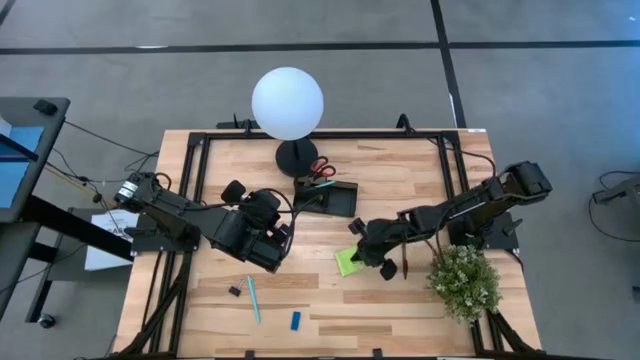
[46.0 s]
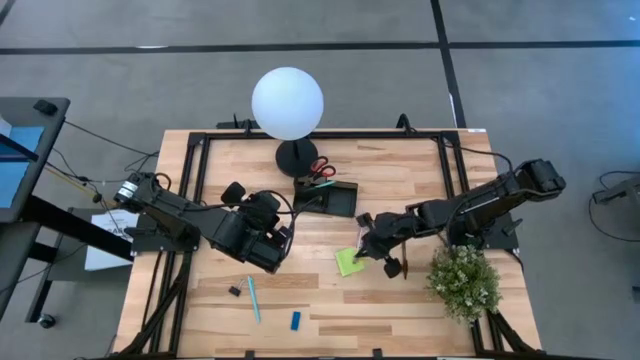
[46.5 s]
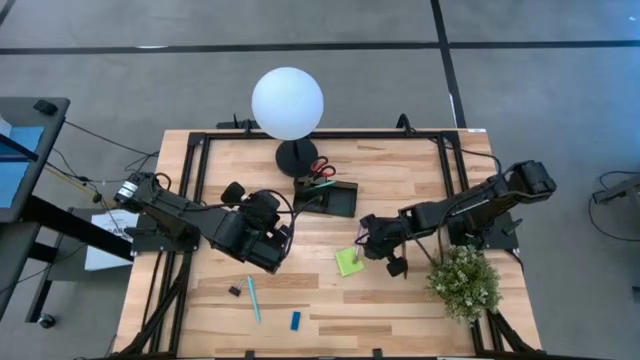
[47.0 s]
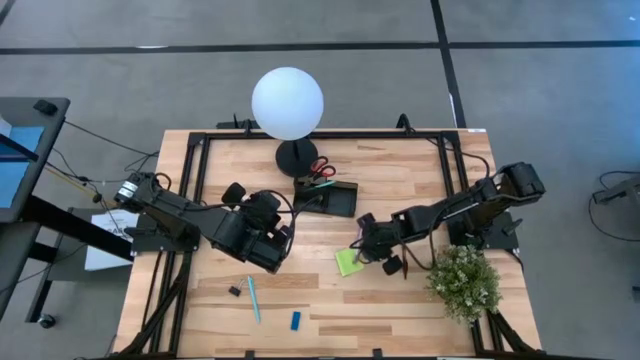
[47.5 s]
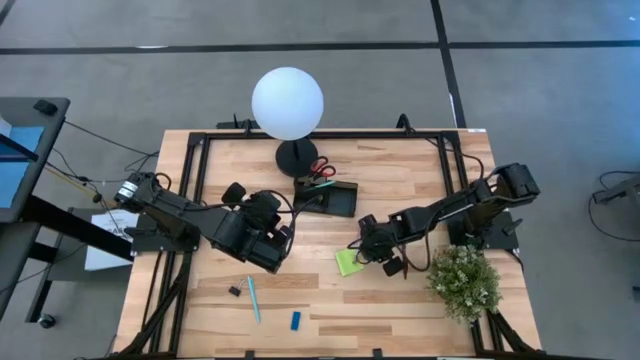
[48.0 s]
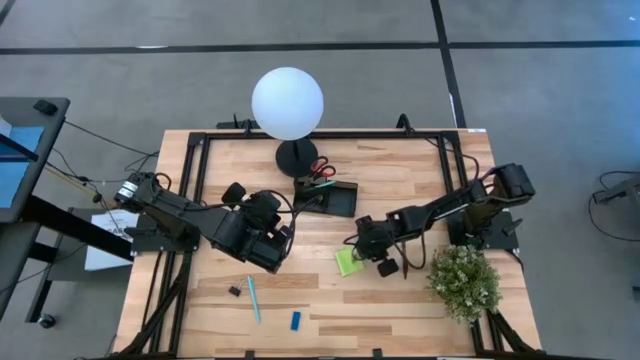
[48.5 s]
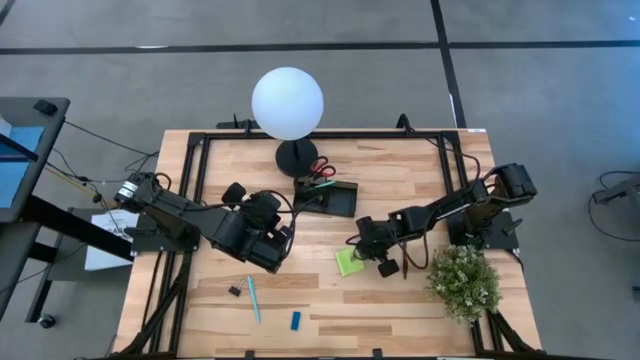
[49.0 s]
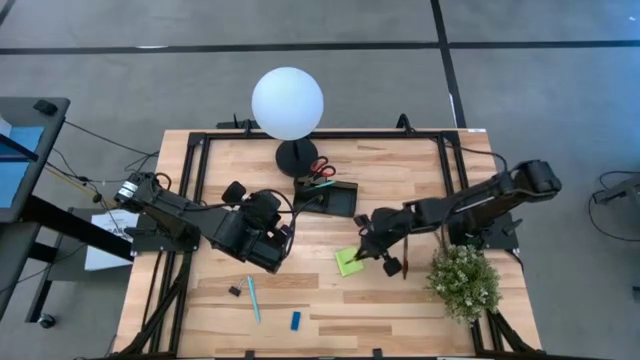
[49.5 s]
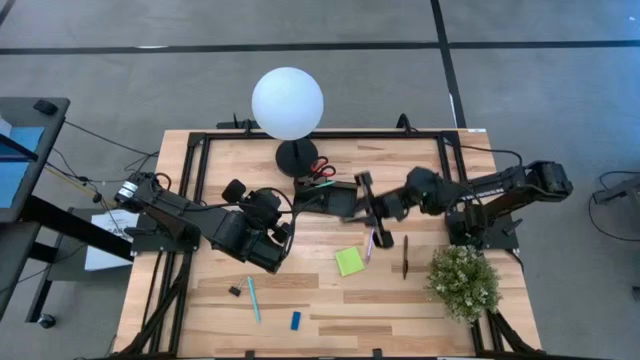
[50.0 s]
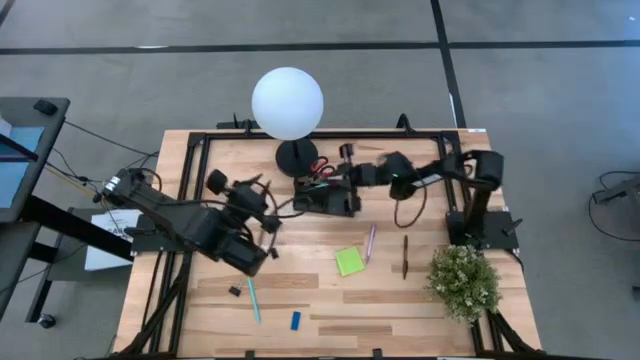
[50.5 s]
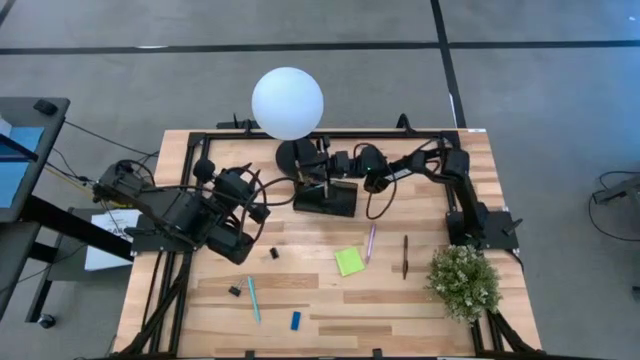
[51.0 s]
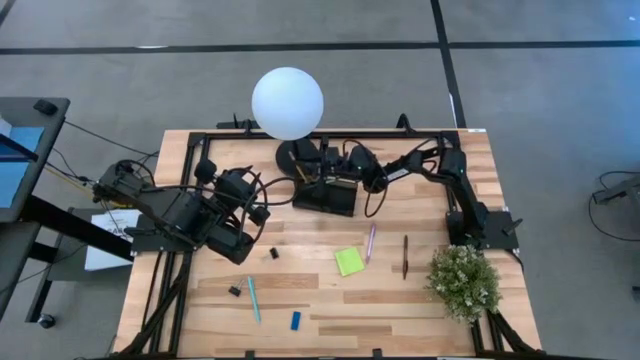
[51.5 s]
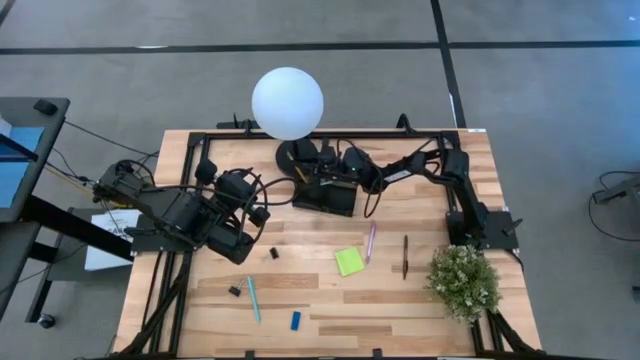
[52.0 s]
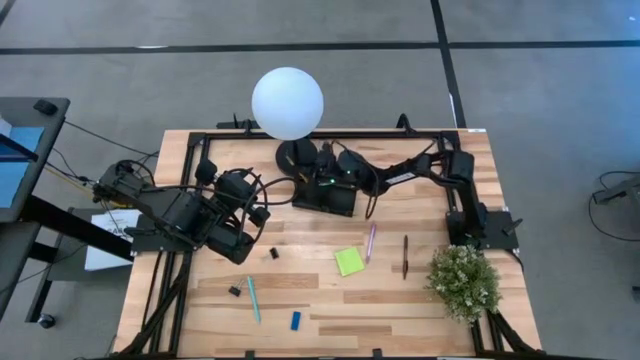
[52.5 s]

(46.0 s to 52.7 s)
Task: Pick and place office supplies into organizer
Put the yellow pencil into the desk organizer

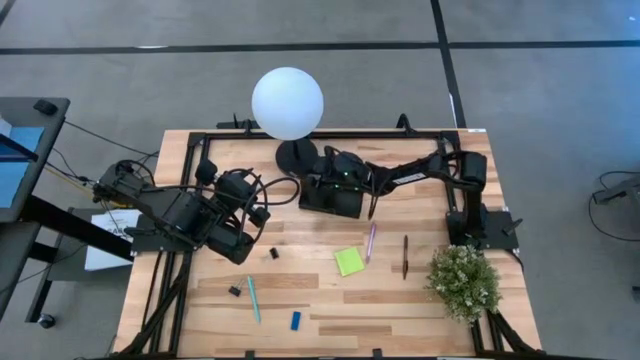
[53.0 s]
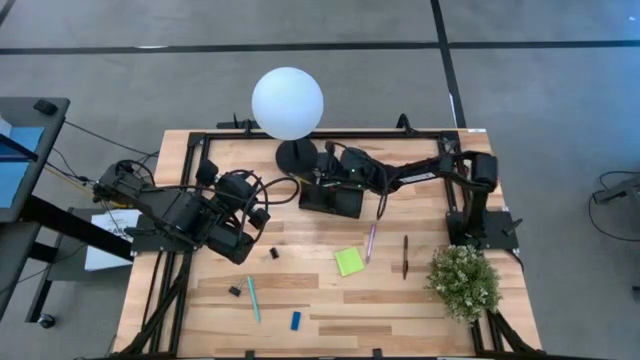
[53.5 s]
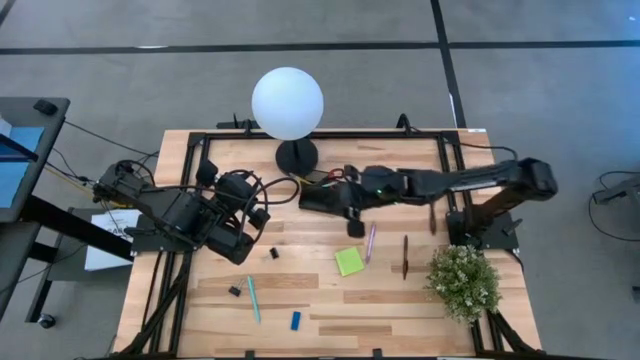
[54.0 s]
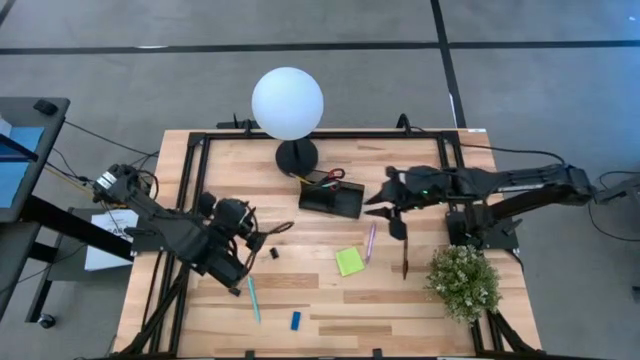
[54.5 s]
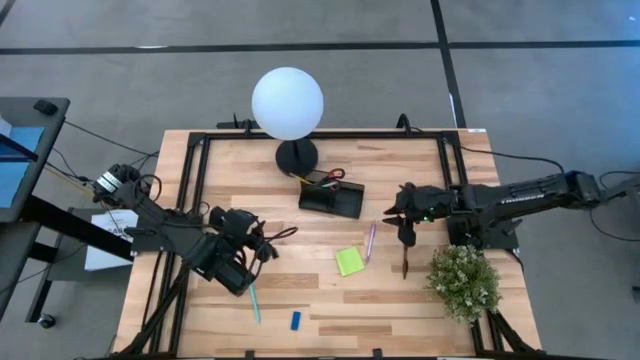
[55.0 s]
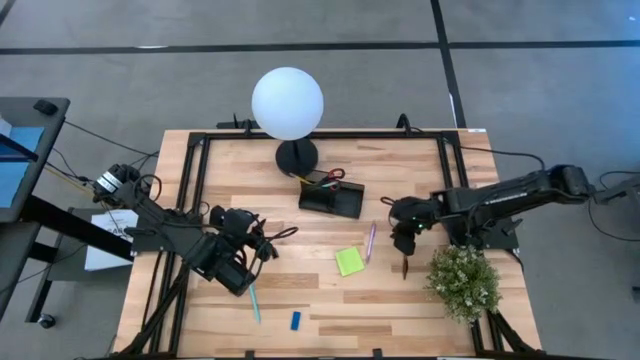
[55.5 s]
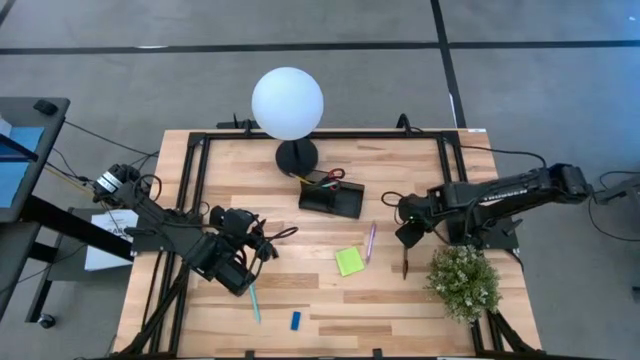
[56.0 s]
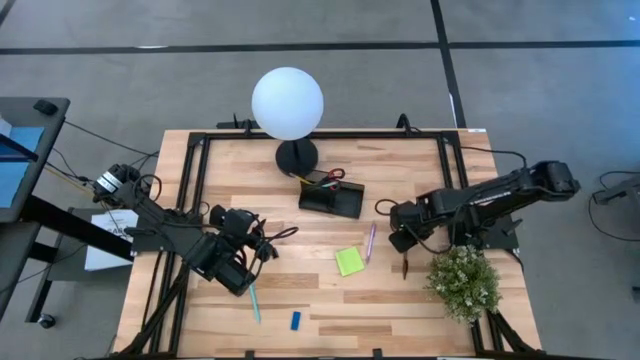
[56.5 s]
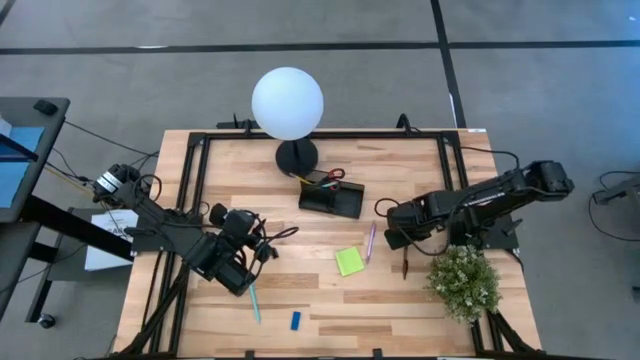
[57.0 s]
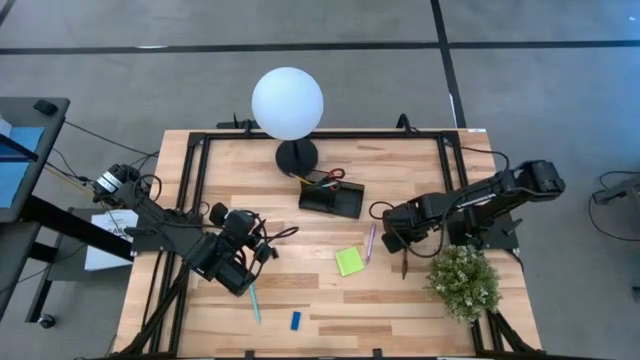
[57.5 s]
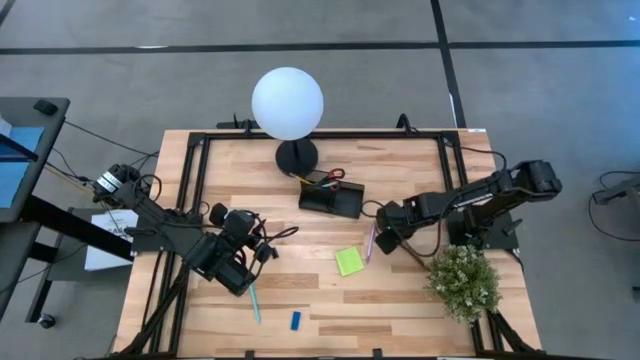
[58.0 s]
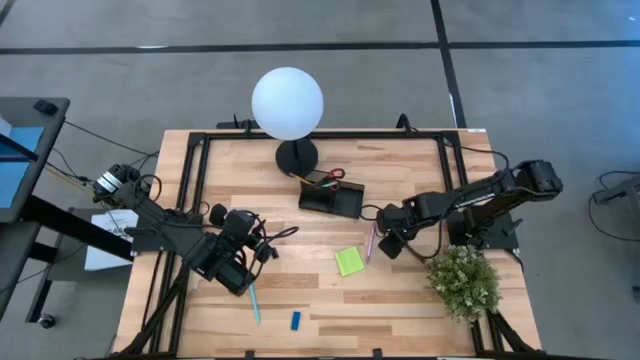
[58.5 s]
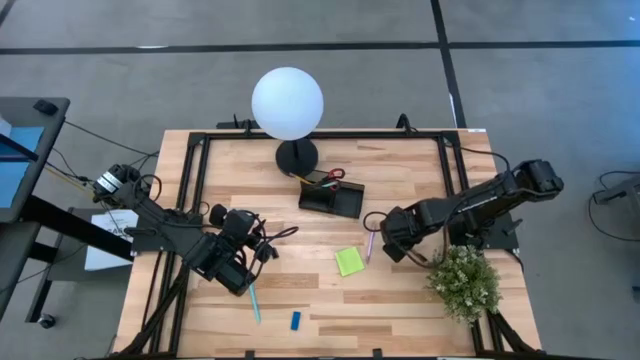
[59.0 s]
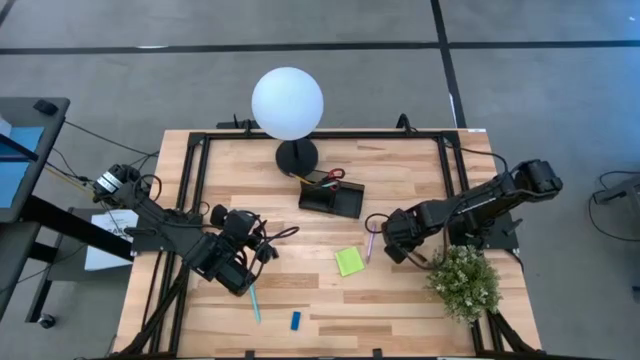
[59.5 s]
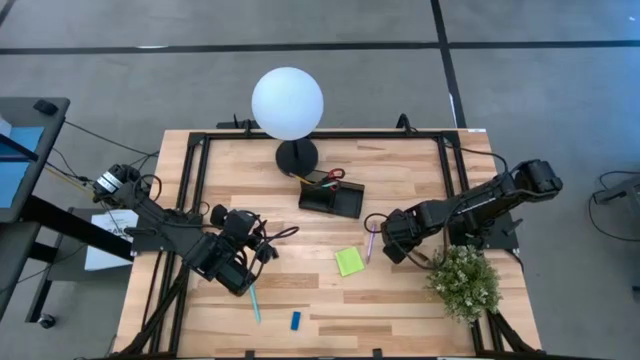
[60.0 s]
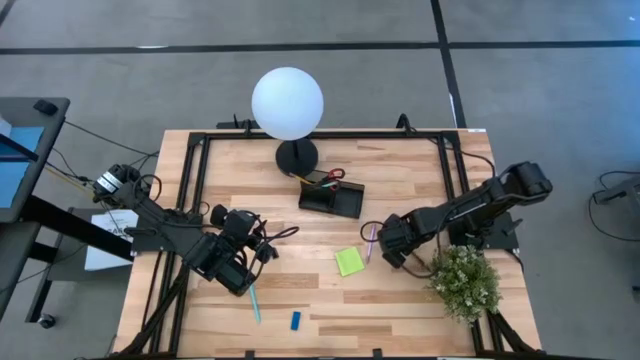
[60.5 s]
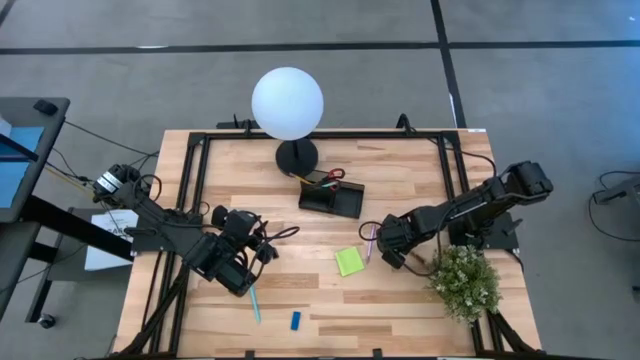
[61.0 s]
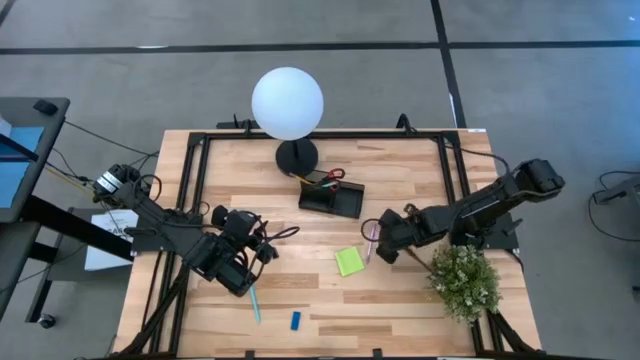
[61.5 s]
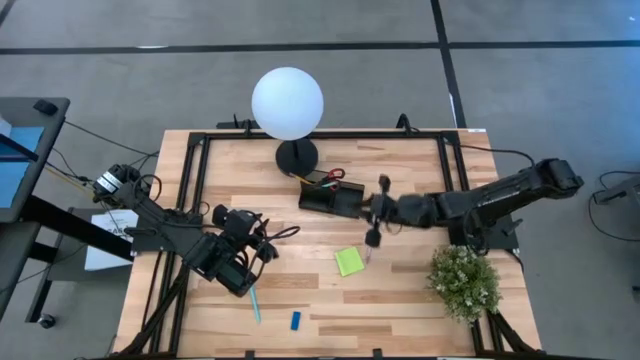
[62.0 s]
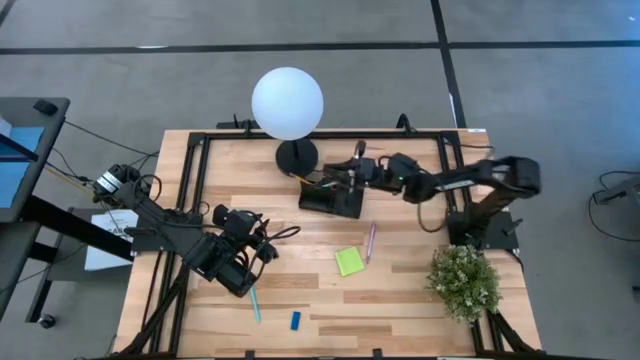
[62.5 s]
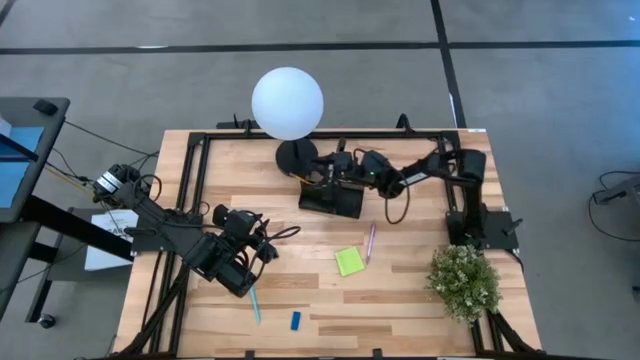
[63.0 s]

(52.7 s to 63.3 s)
Put the black pen into the desk organizer

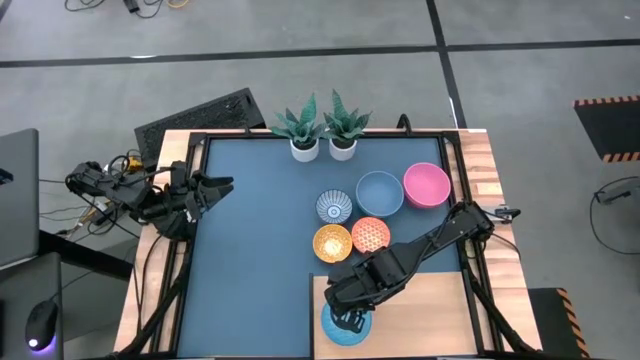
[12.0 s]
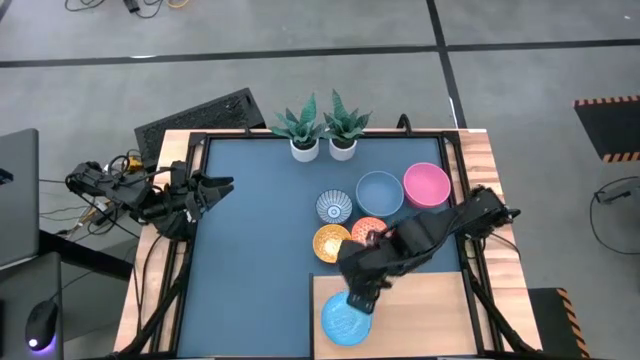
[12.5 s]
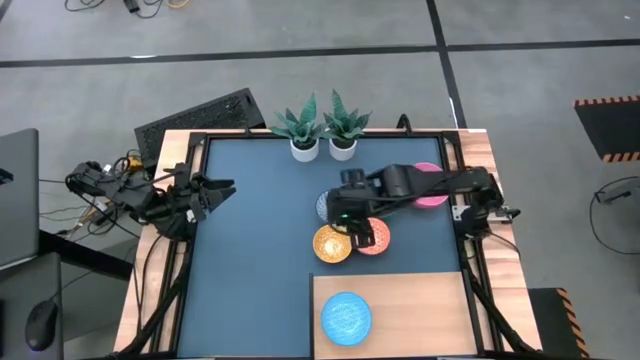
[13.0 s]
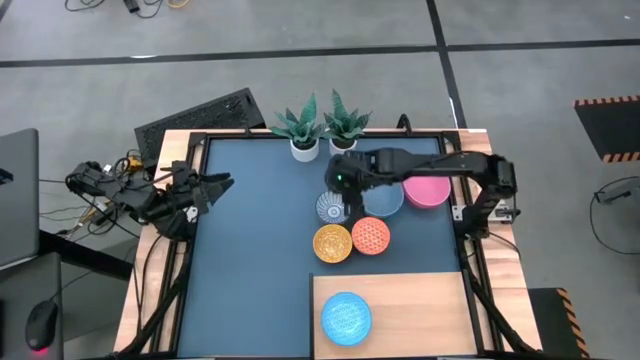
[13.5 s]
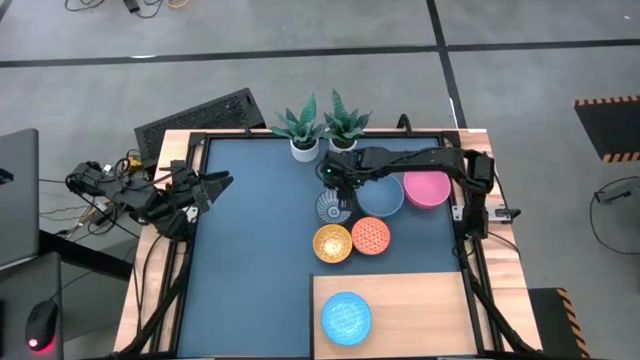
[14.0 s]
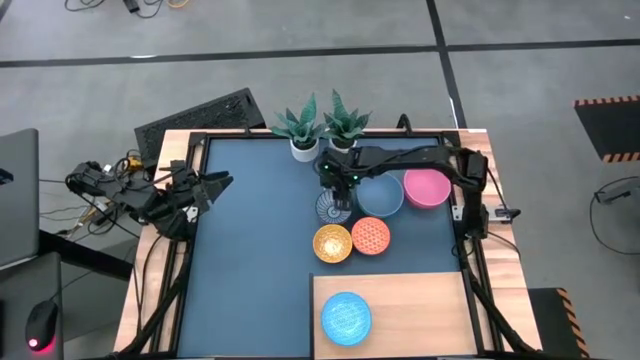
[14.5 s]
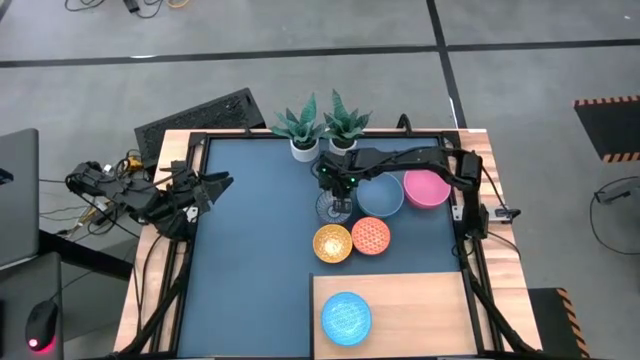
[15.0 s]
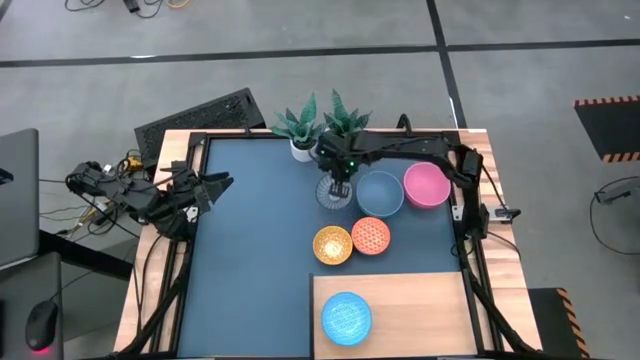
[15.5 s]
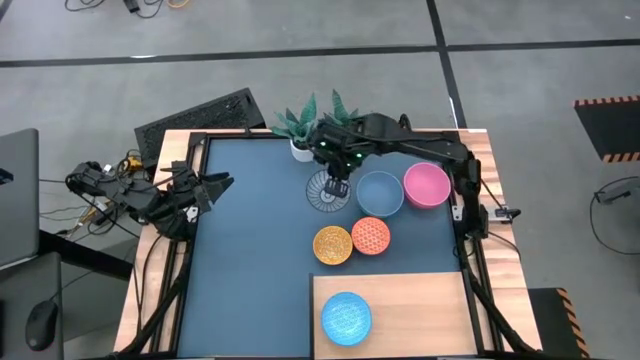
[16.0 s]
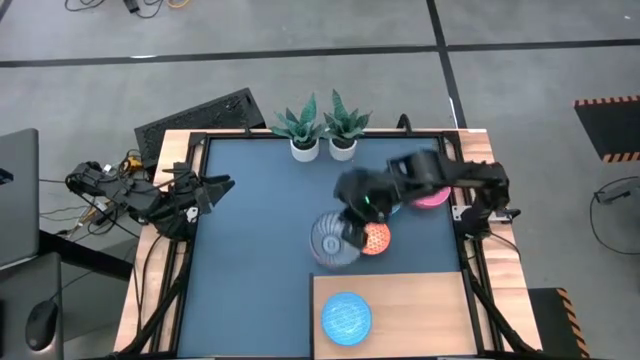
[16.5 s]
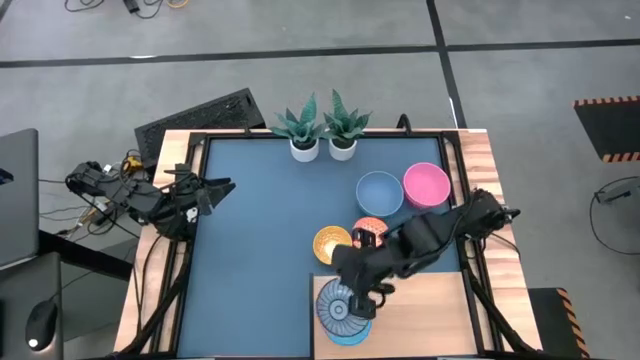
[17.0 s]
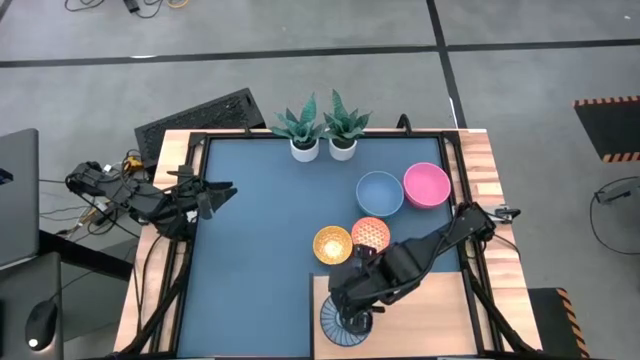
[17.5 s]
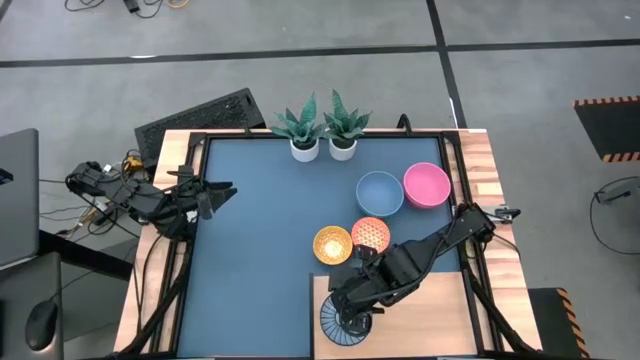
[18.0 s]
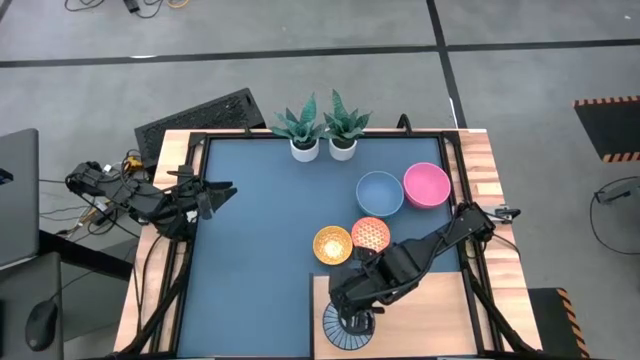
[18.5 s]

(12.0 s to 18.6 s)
Task: Place and stack bowls onto a shelf
Stack the blue patterned bowl on top of the light blue bowl on the shelf
